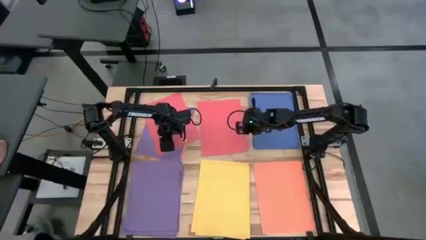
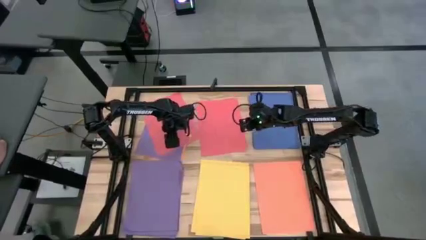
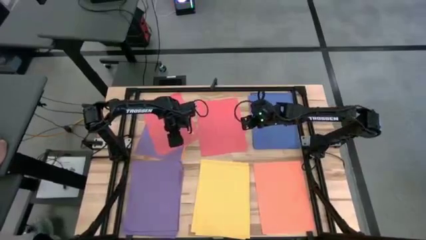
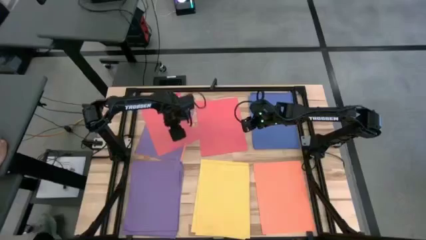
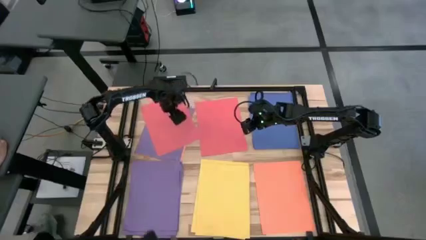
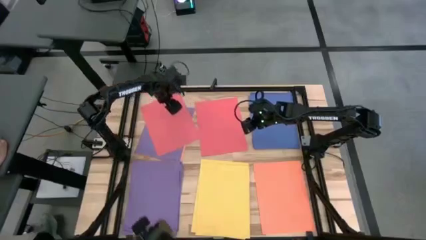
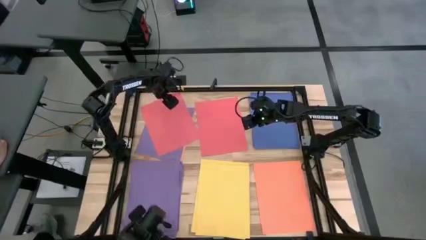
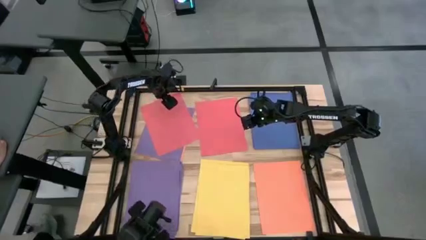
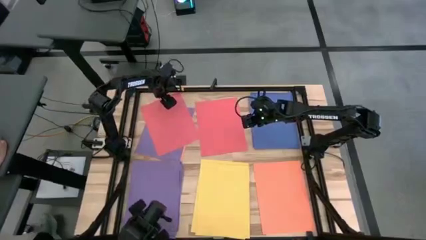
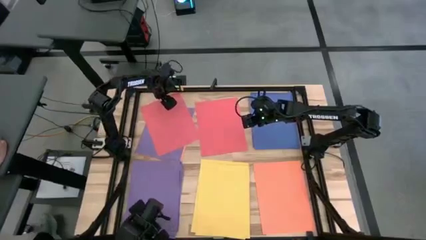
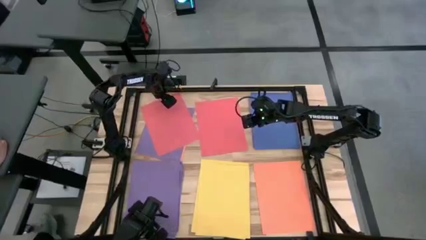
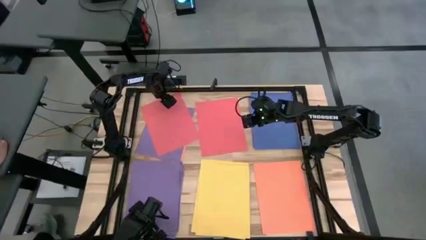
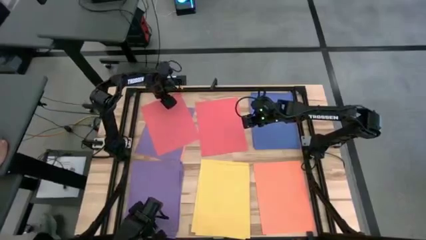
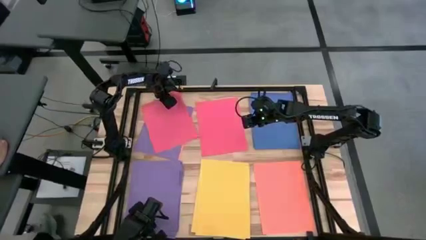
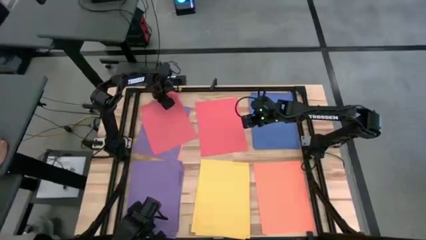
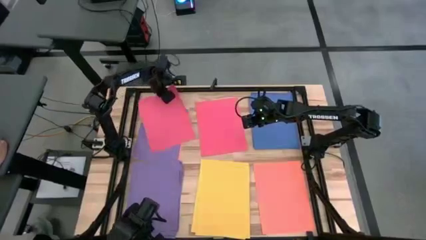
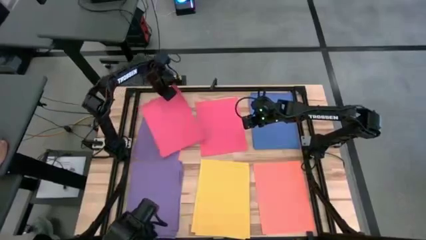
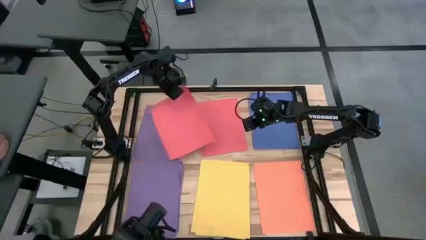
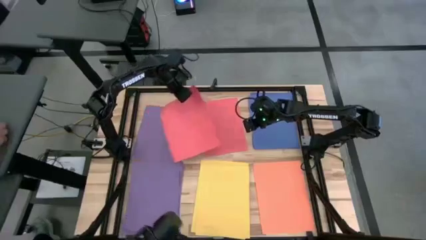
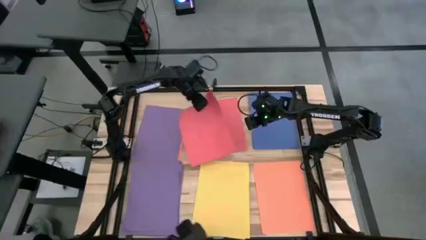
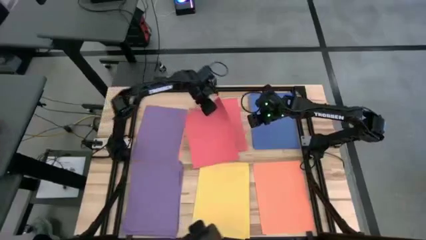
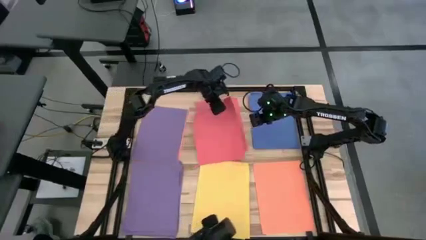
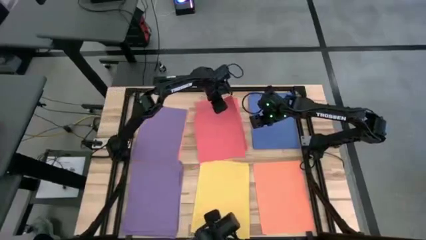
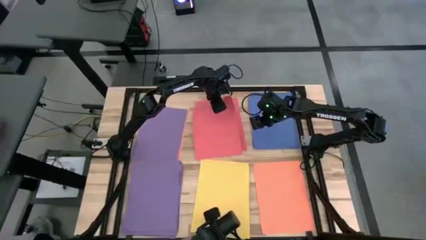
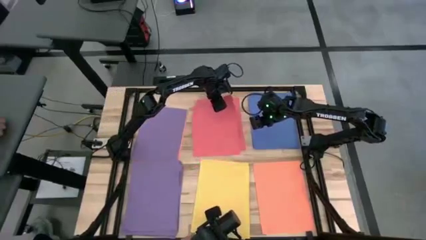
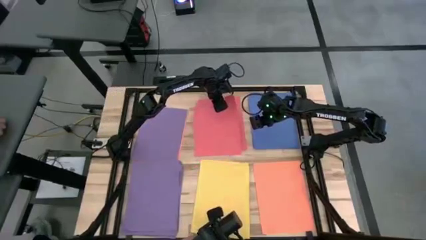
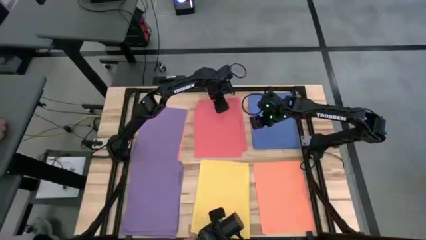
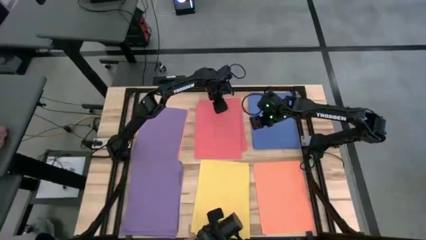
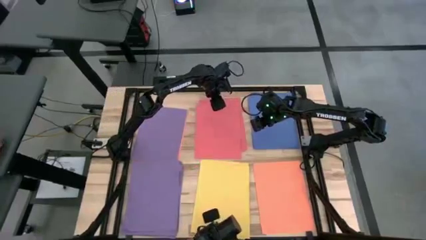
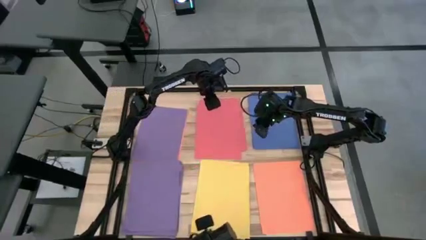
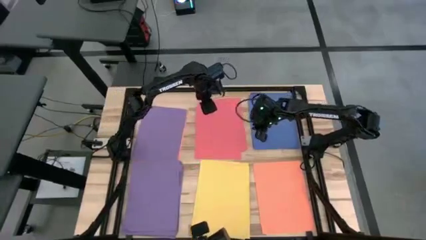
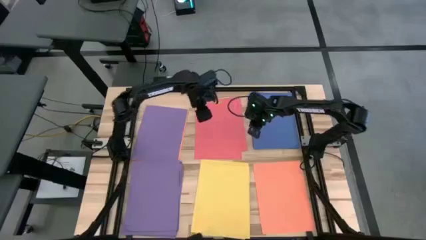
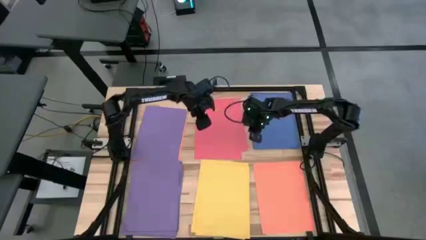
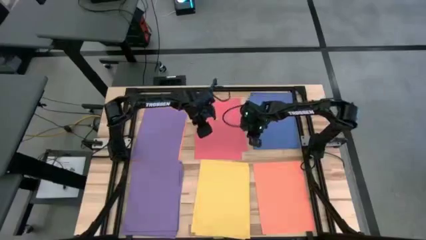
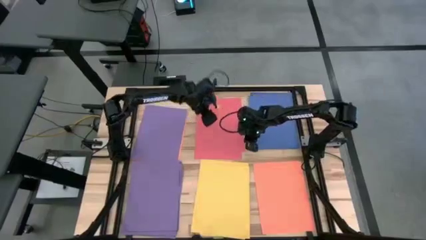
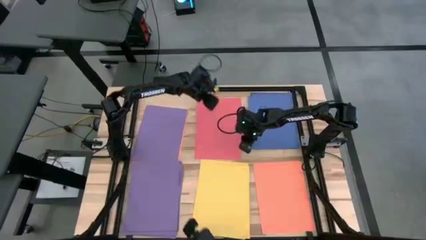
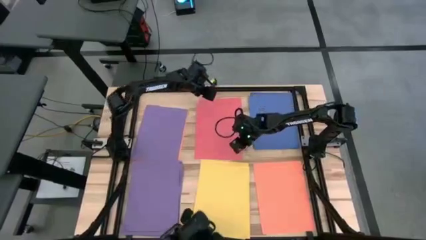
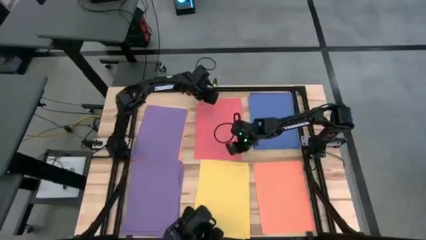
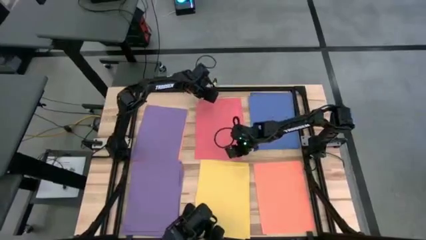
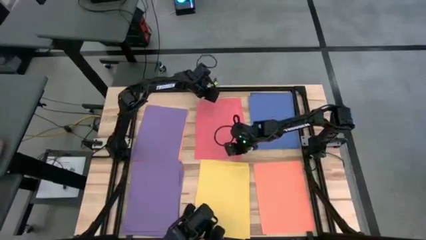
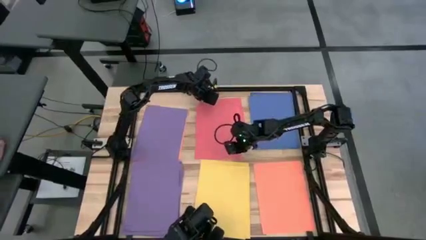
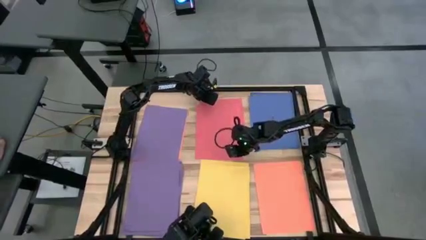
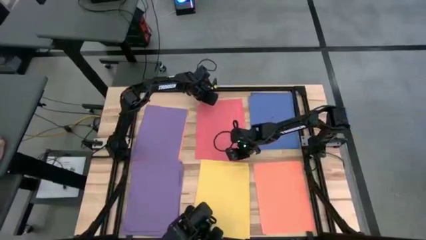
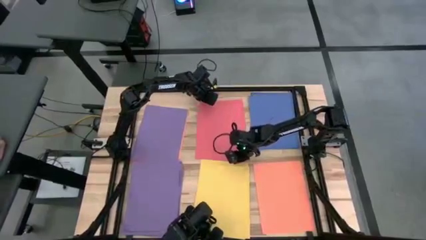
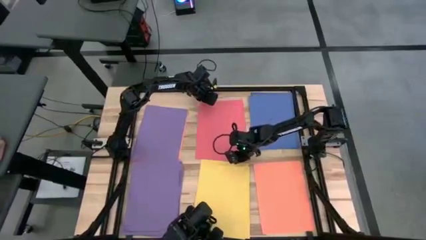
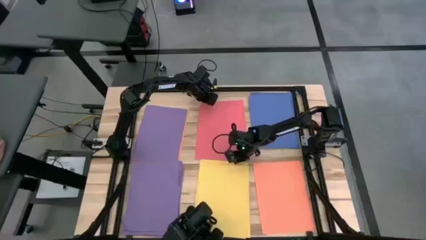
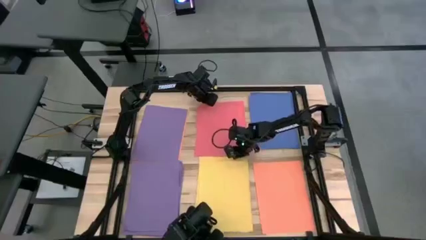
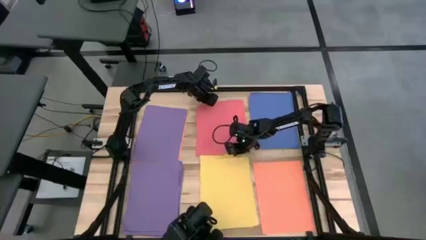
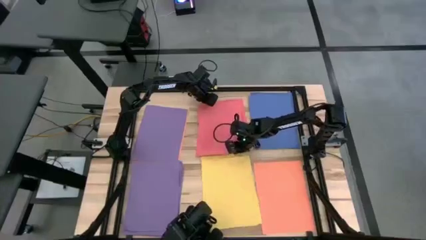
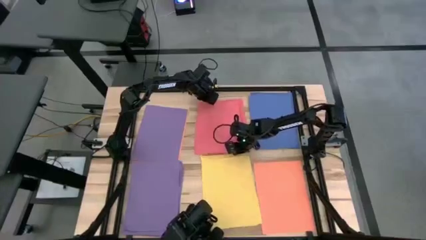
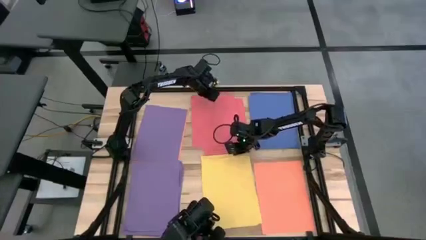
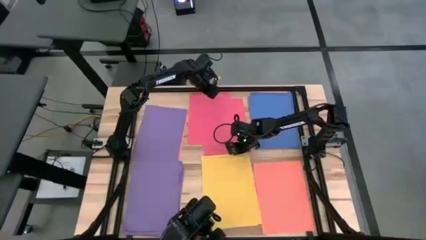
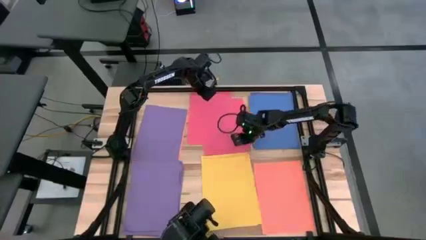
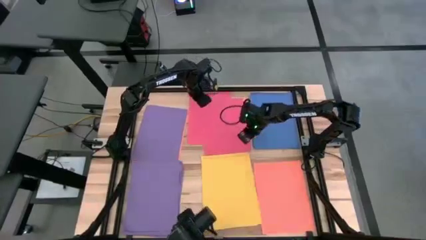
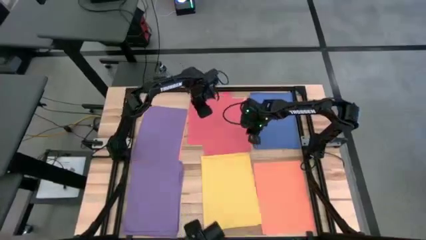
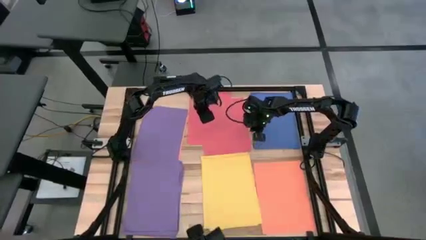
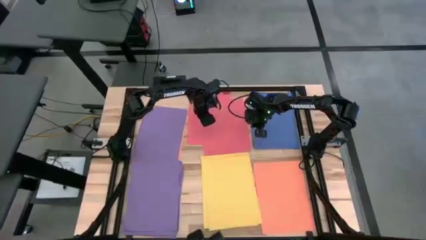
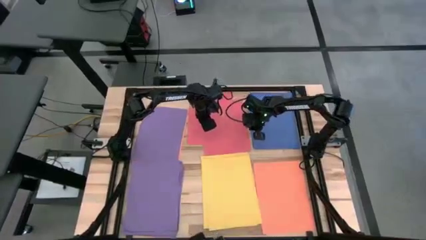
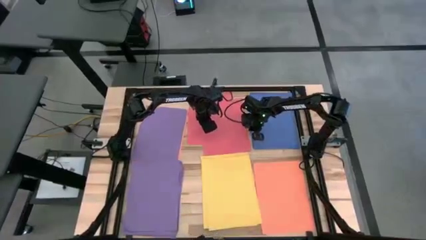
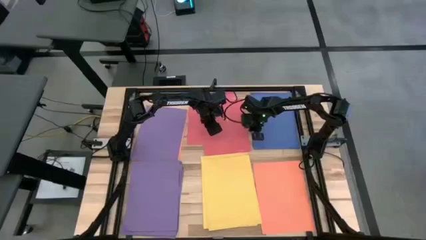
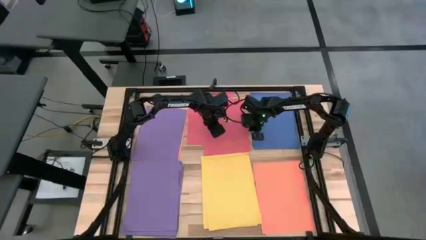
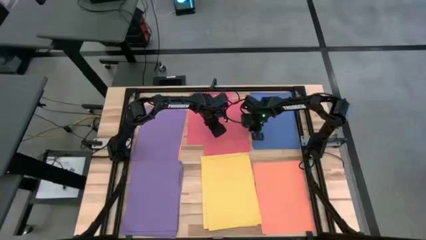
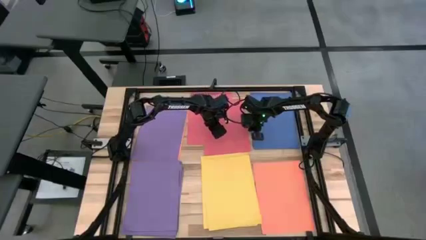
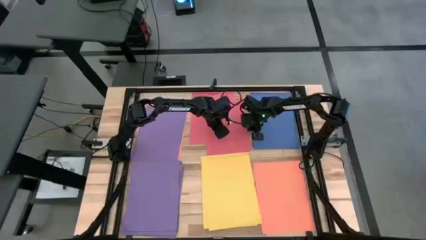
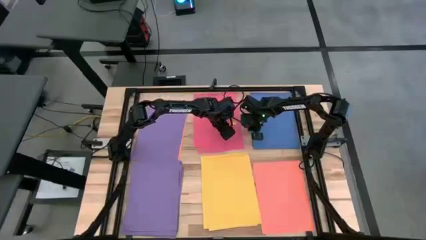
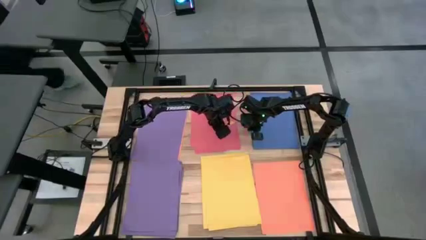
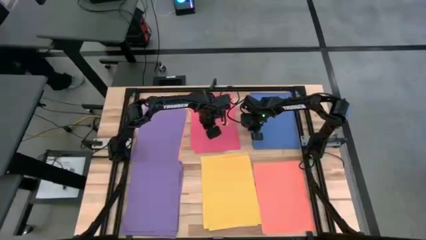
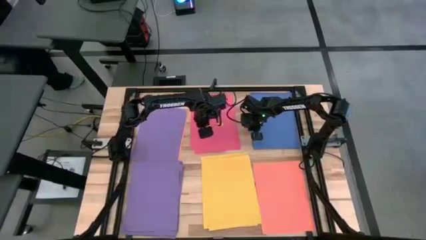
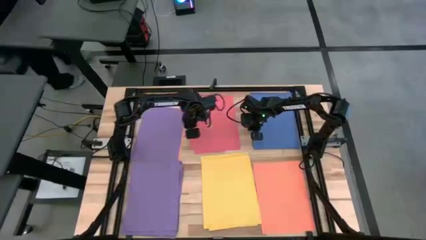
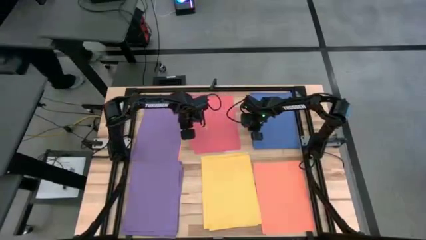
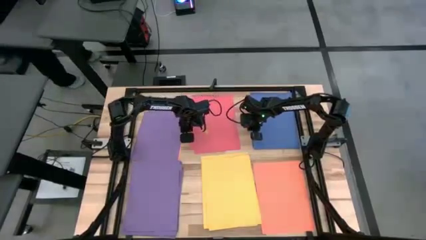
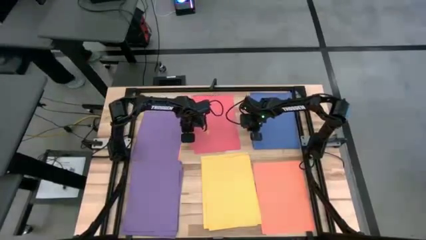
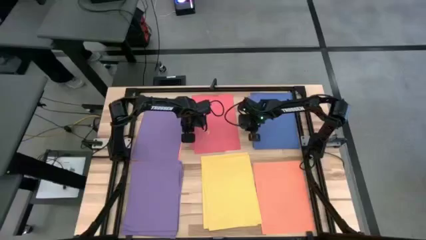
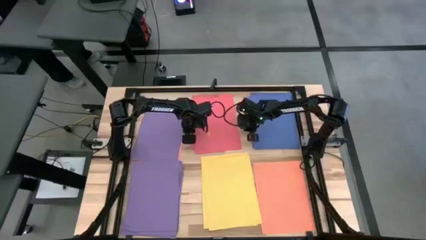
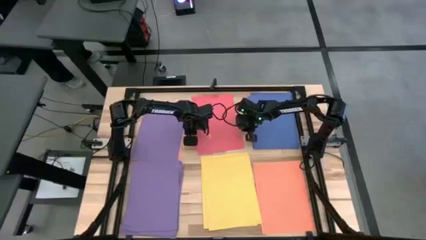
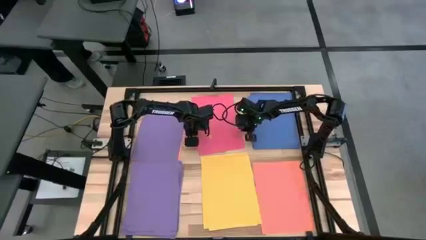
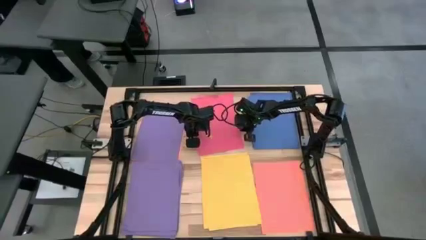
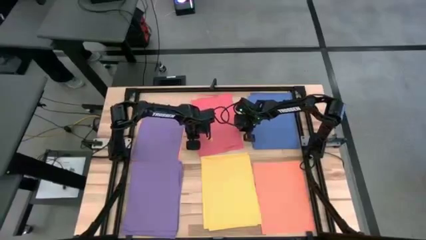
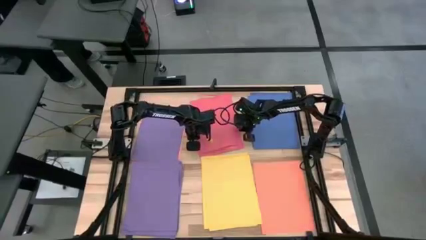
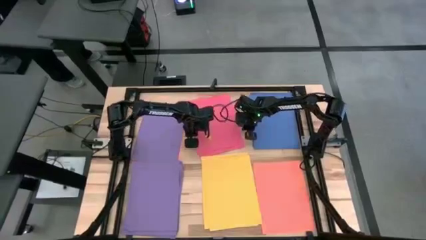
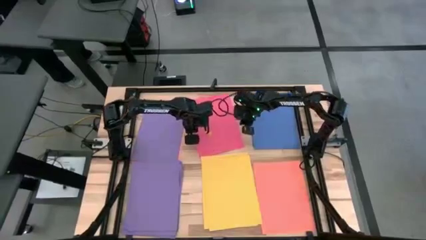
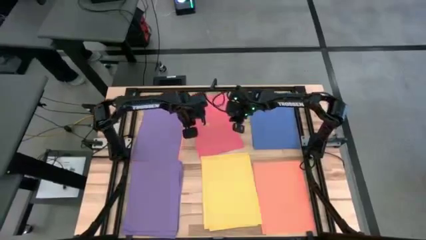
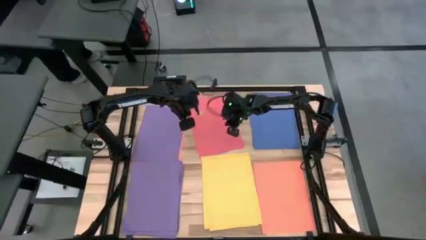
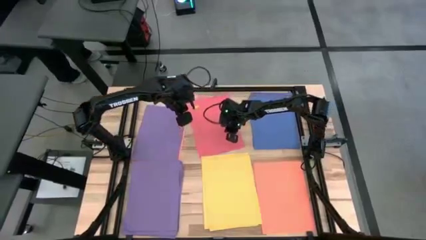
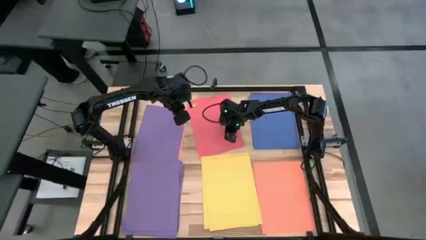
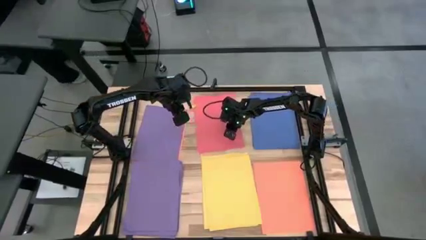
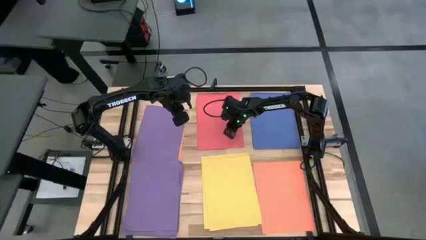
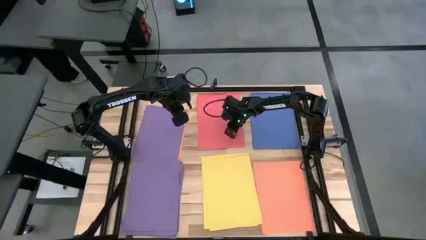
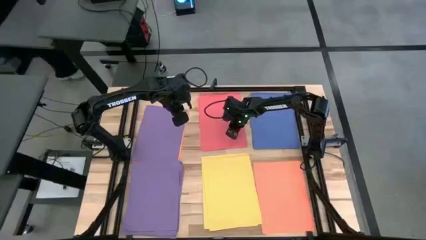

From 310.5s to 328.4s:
Task: Organize paper
Stack the pink paper on top of the pink paper
